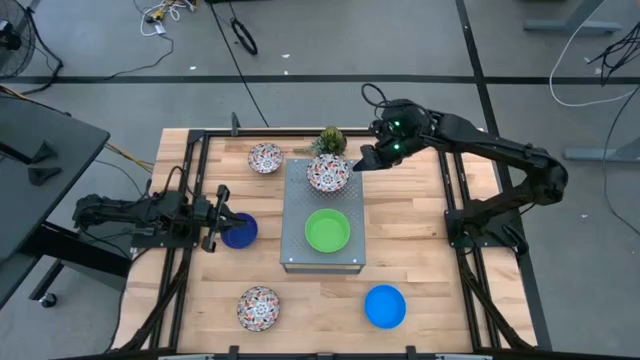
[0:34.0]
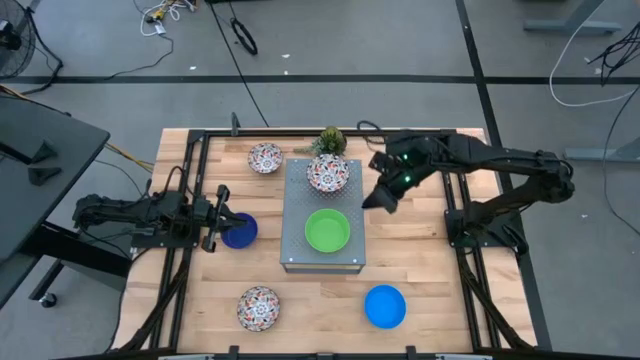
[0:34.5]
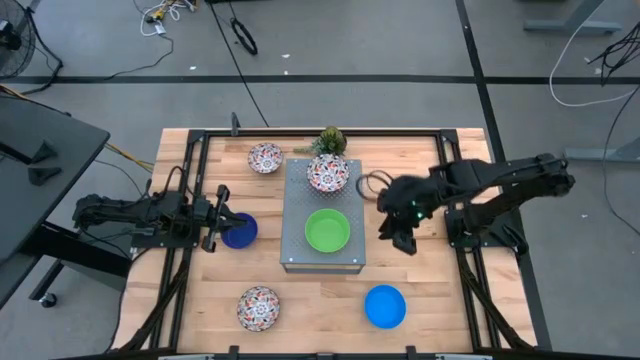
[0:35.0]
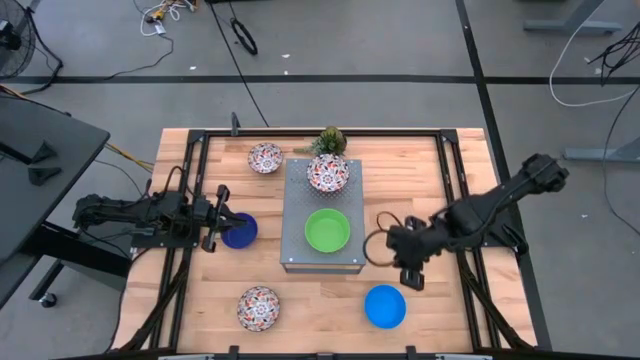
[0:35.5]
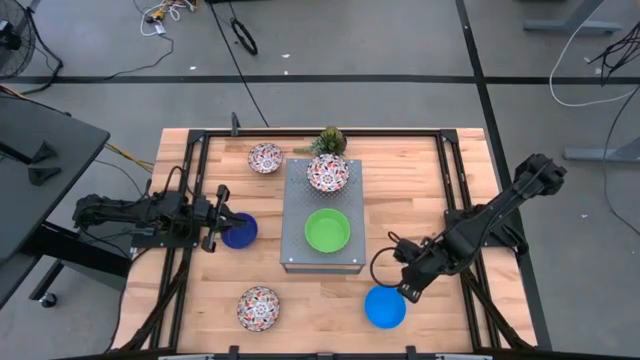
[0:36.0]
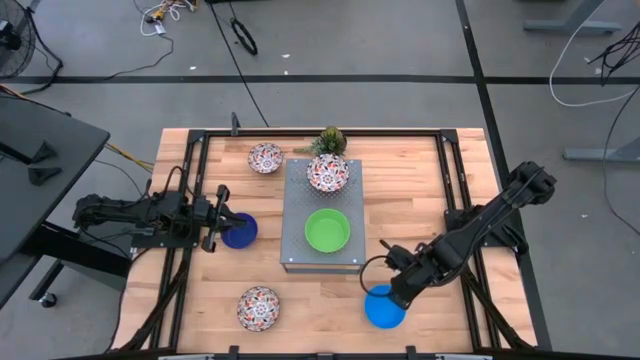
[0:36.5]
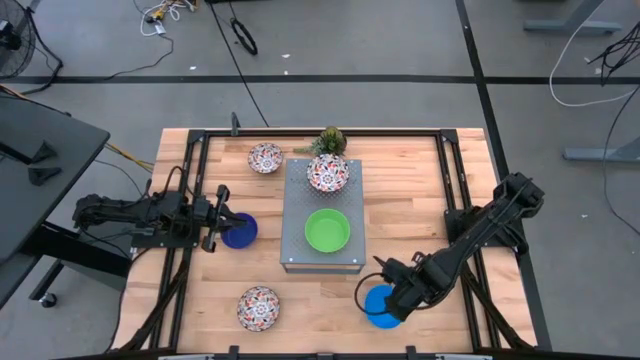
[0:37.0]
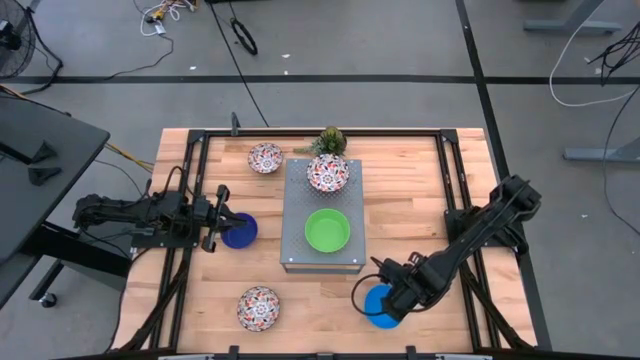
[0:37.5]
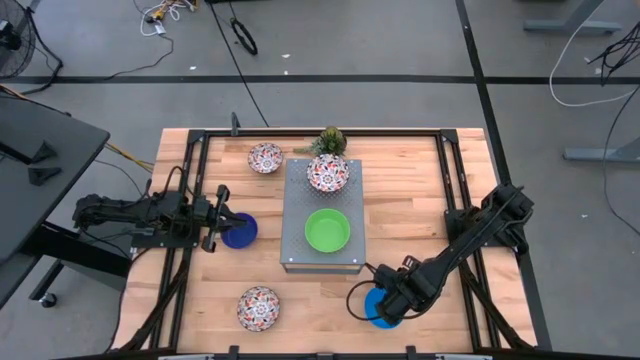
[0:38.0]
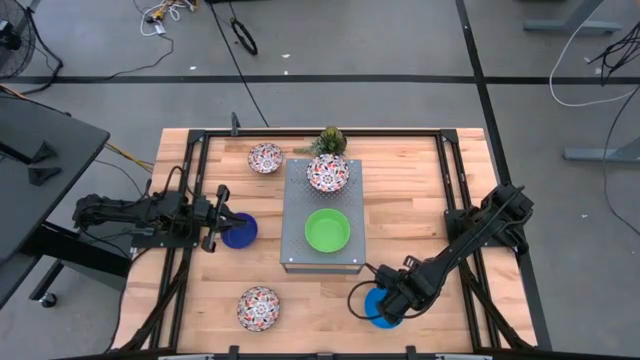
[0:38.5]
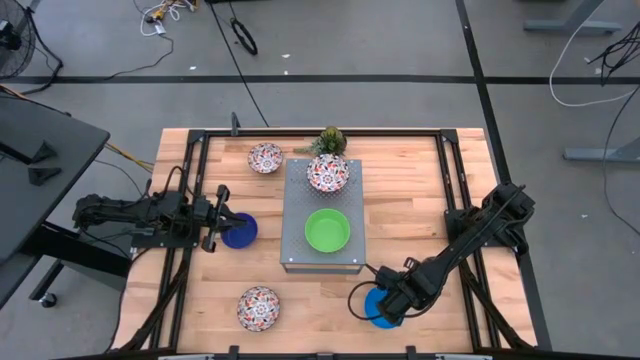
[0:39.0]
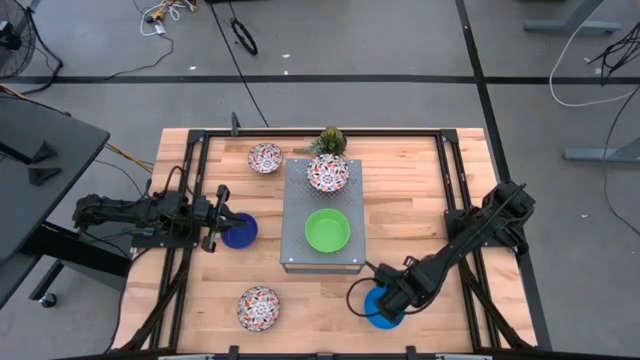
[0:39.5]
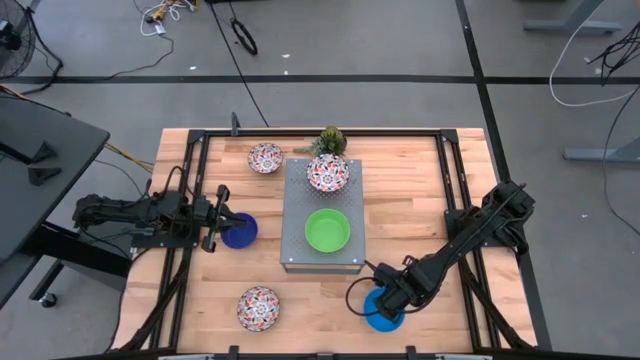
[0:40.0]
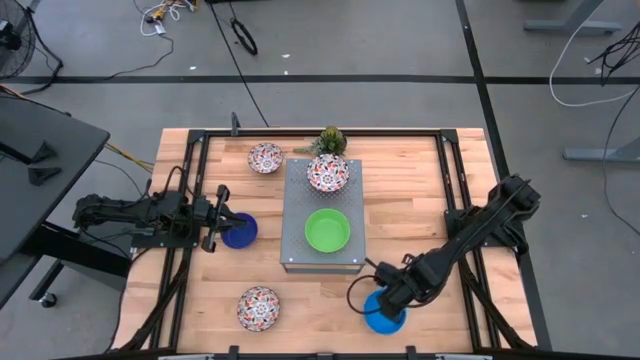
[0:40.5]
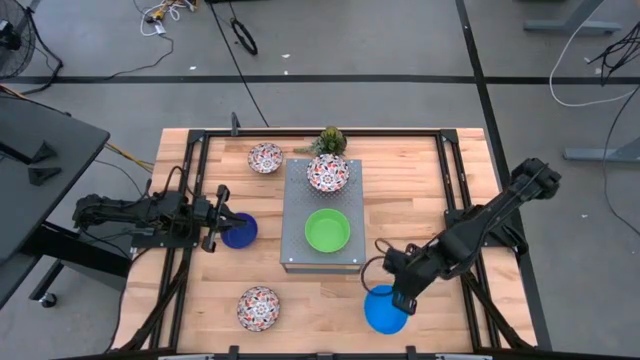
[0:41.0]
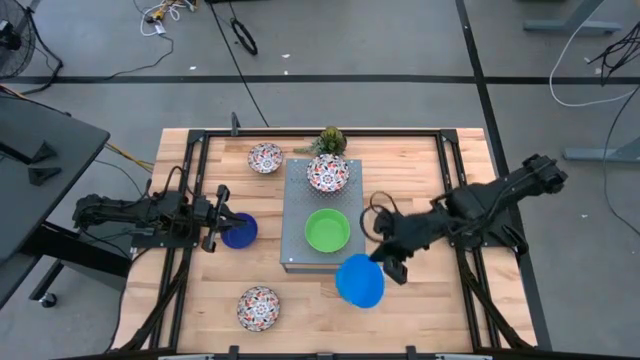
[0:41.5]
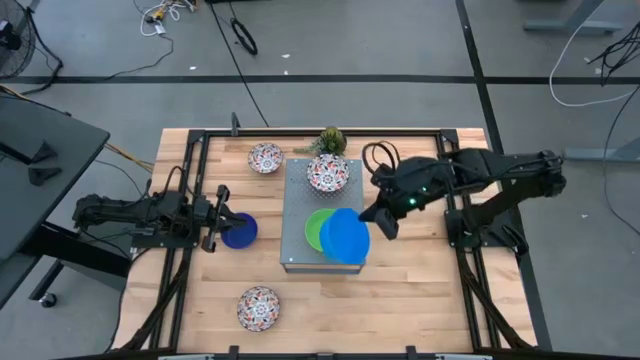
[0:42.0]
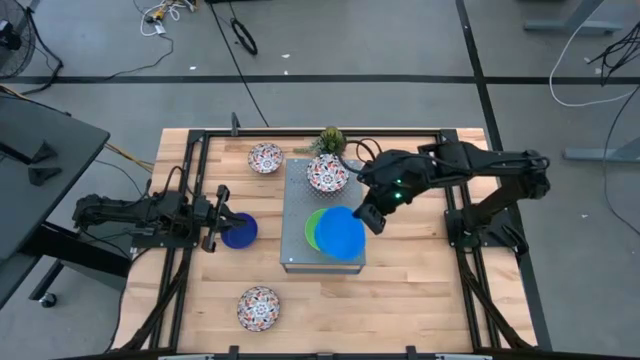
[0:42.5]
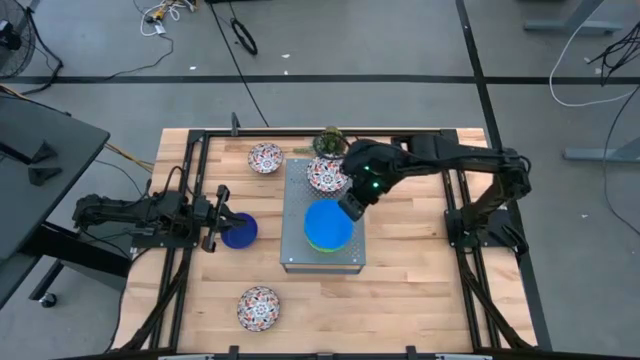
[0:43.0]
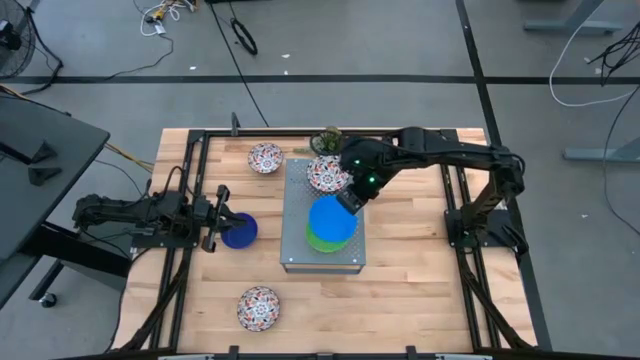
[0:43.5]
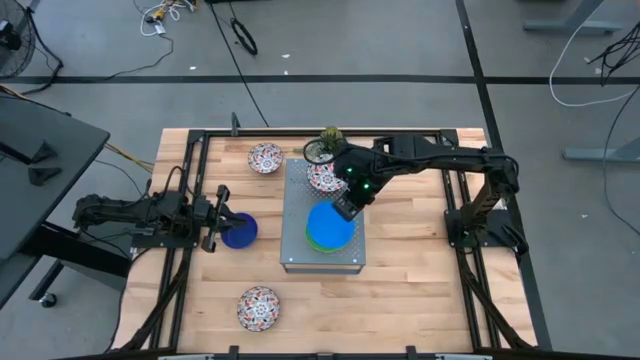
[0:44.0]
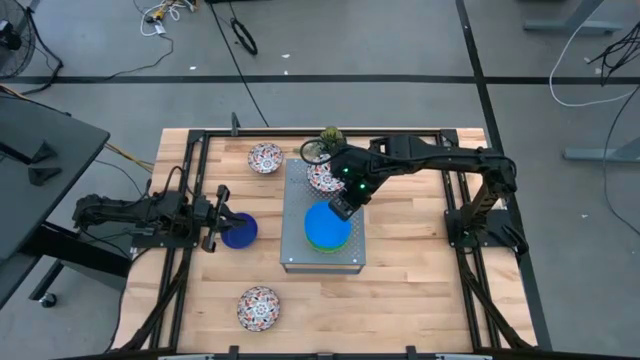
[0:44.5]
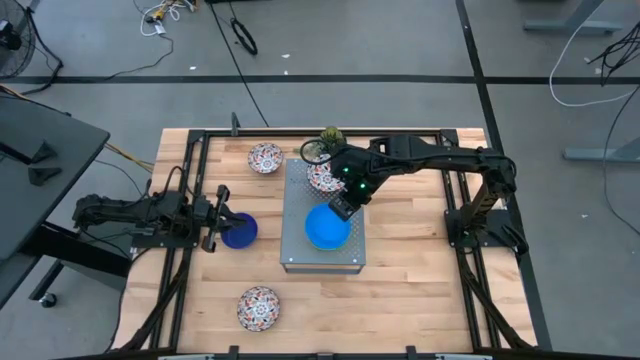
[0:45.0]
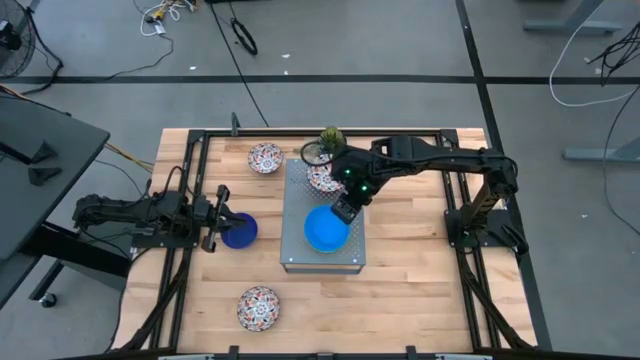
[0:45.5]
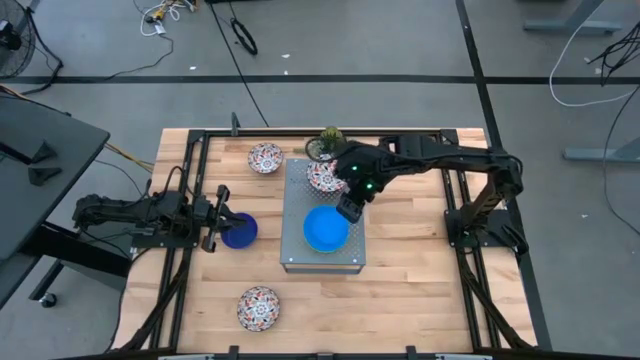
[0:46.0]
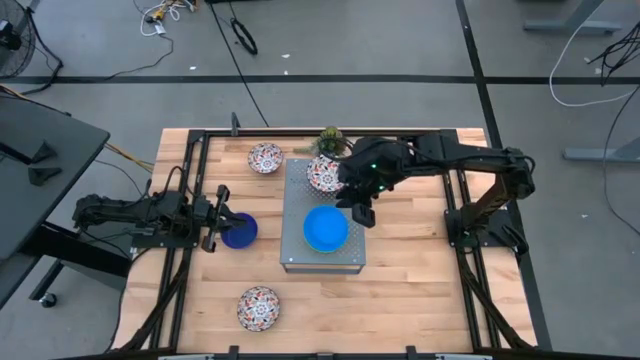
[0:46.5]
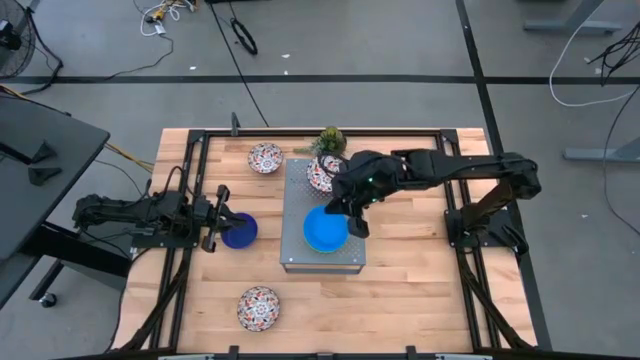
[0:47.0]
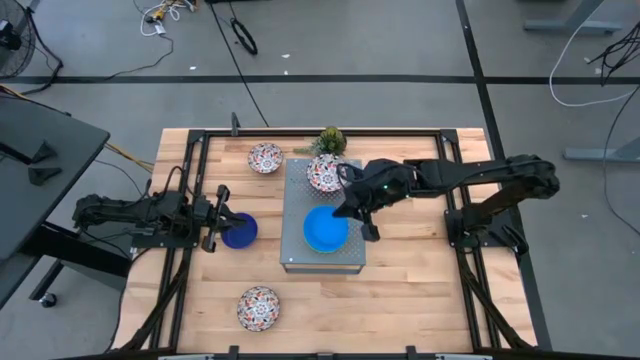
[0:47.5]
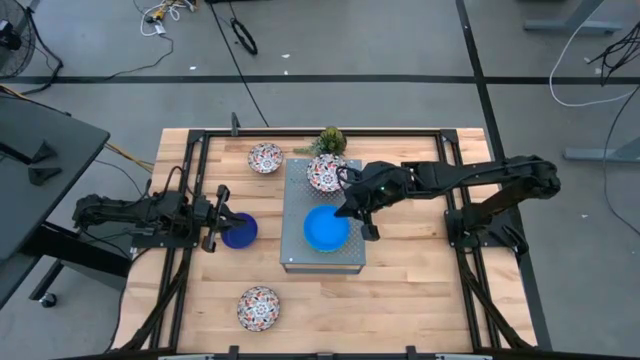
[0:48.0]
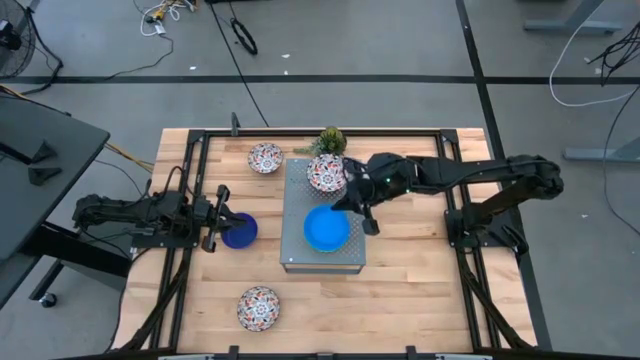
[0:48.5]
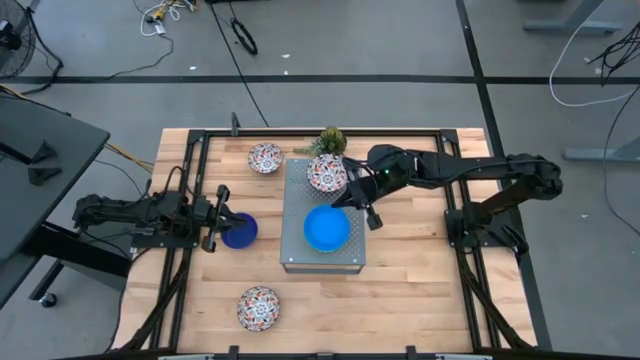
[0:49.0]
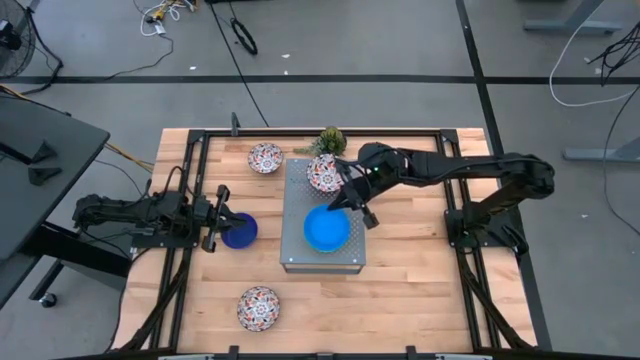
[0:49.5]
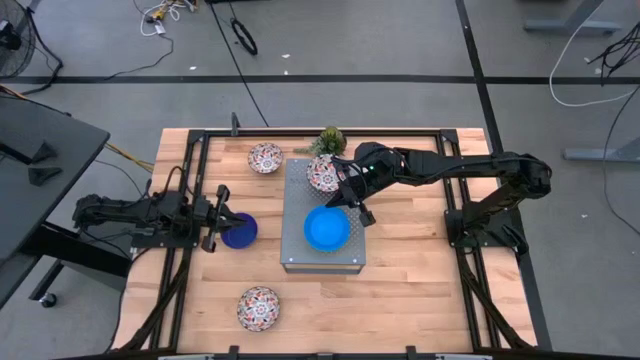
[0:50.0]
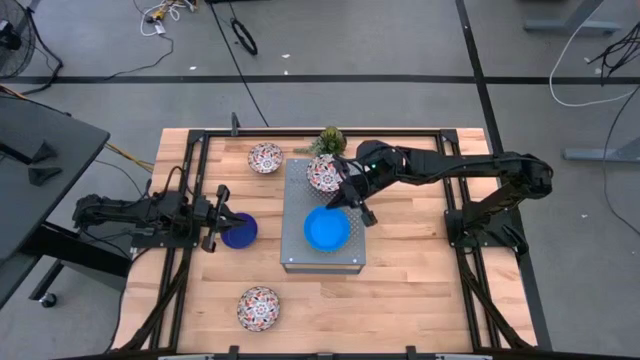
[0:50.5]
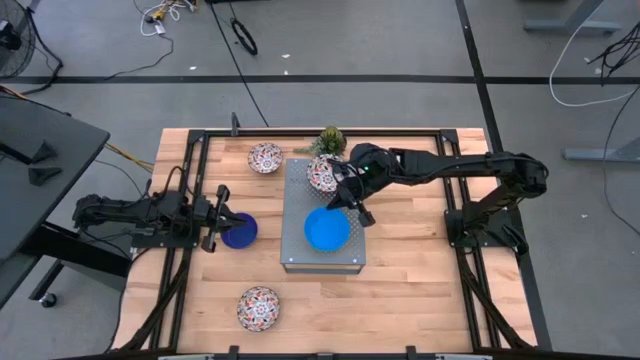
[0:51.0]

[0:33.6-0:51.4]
Task: Pick & Place Mini bowls
Stack the light blue bowl on the green bowl on the shelf

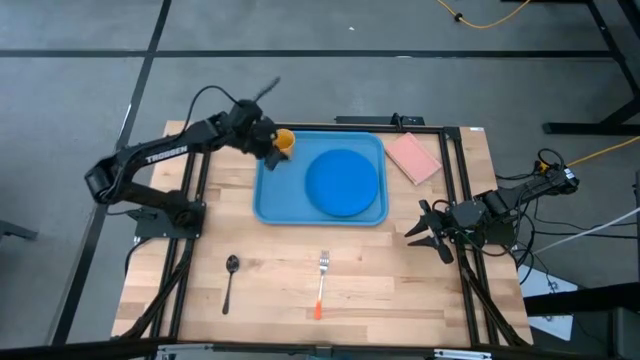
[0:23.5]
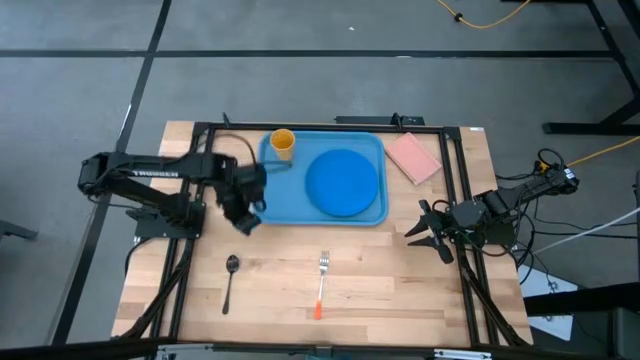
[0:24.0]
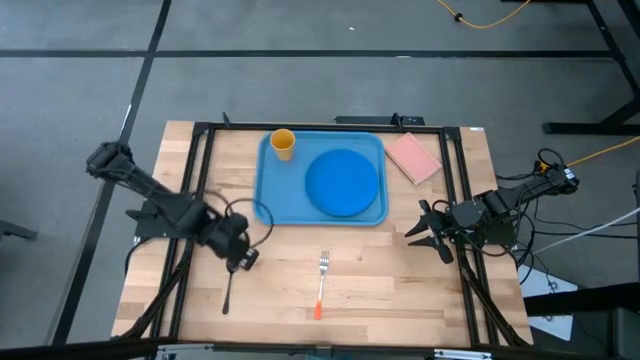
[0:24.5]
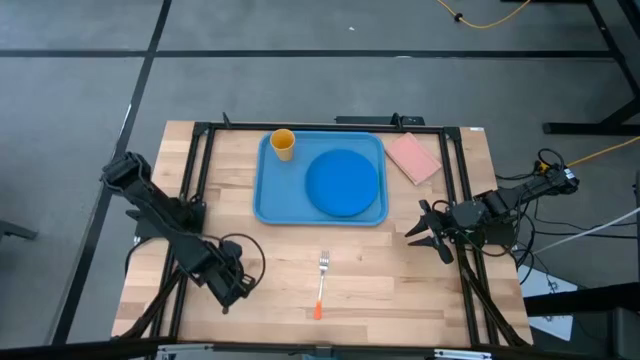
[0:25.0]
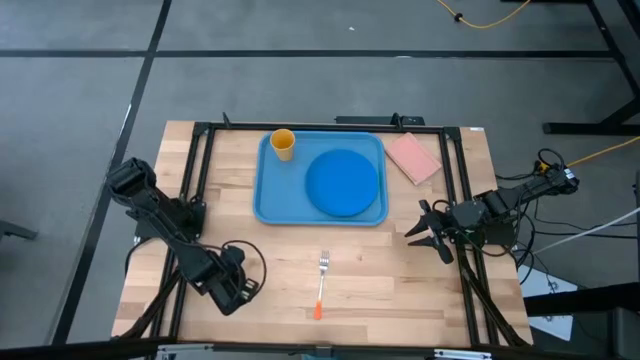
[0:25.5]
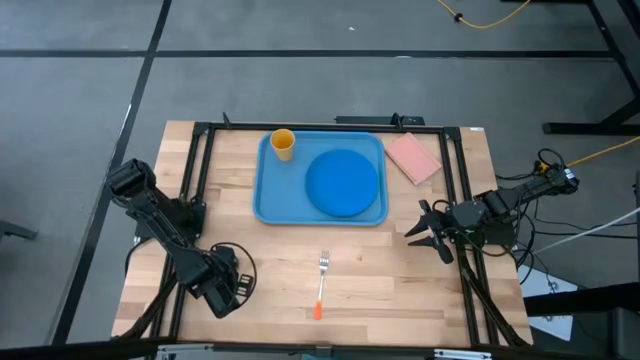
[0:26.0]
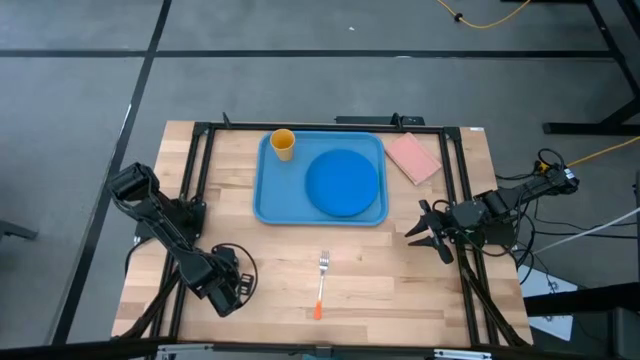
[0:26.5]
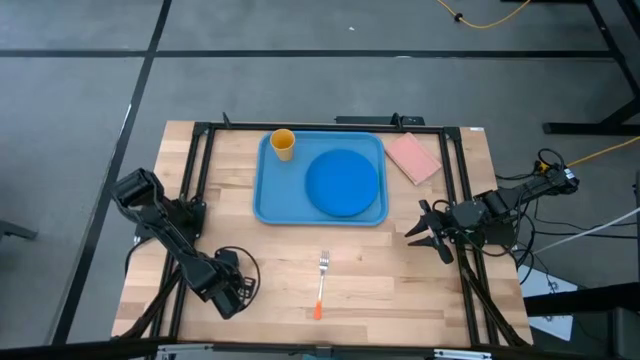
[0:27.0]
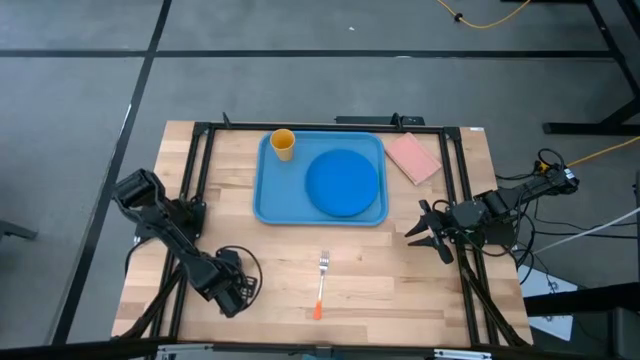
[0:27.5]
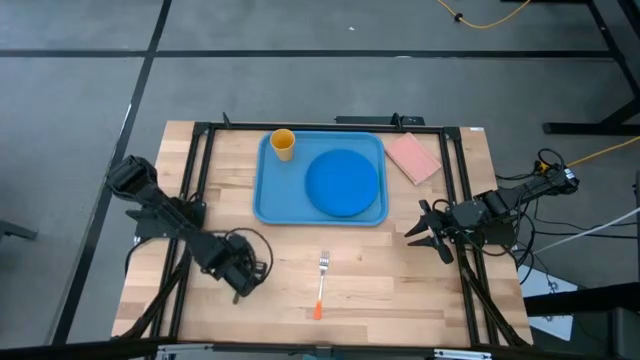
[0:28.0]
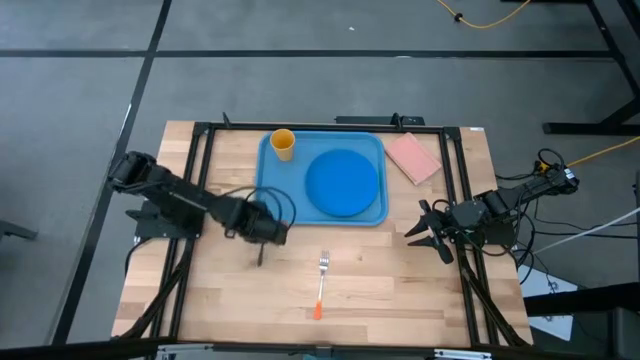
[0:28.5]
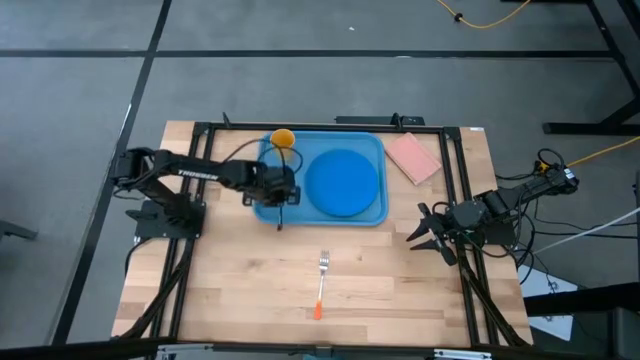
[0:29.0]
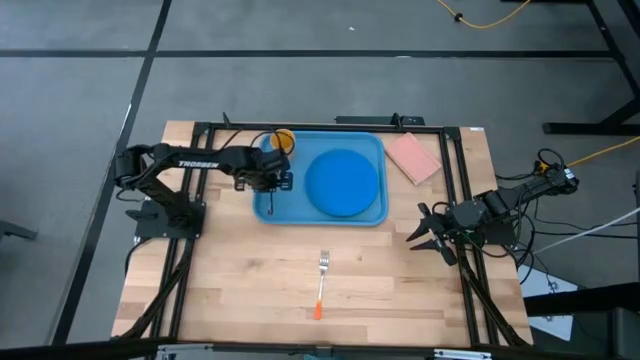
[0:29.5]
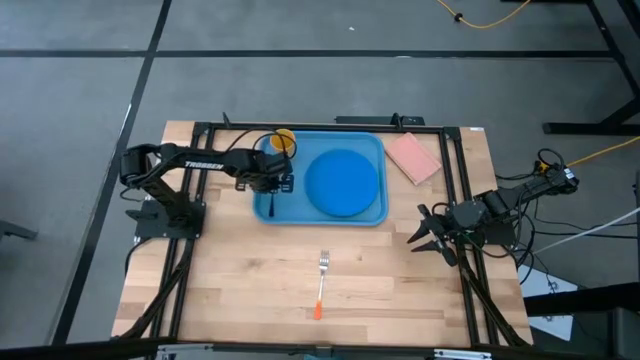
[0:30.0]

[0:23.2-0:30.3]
Task: Pick and place plate/cup/fork/spoon on tray
Put the black spoon on the blue tray to the left of the blue plate
